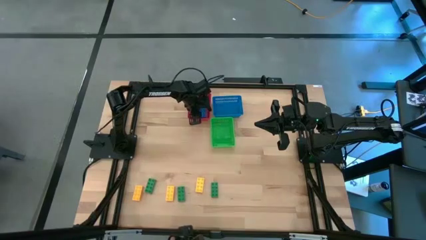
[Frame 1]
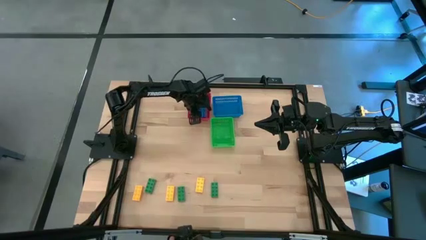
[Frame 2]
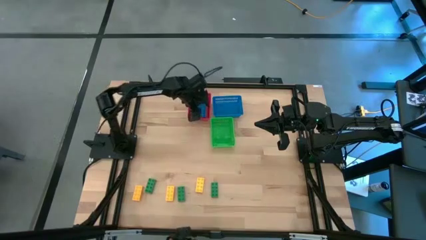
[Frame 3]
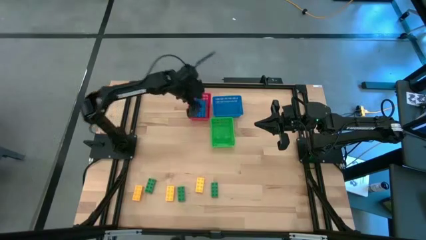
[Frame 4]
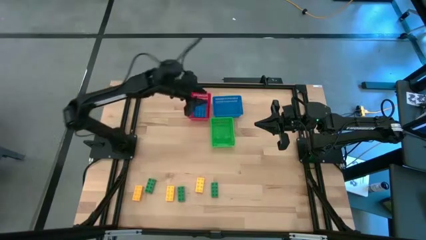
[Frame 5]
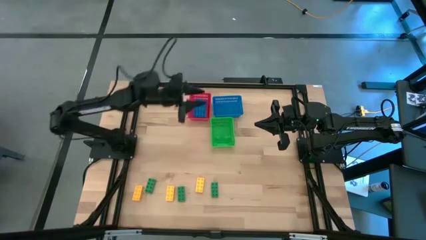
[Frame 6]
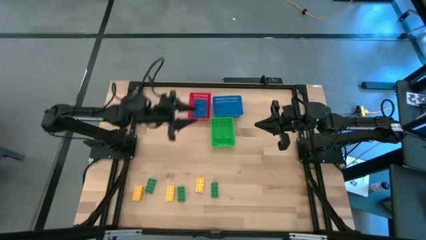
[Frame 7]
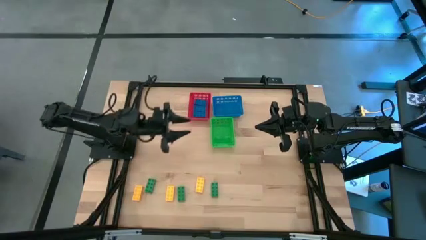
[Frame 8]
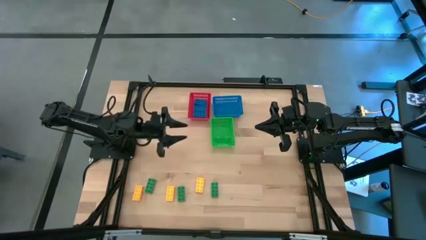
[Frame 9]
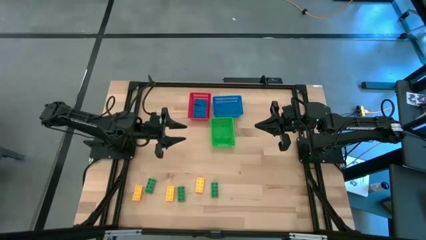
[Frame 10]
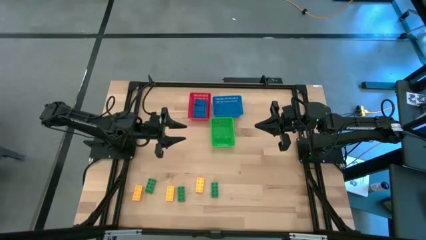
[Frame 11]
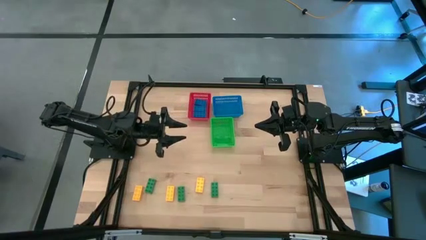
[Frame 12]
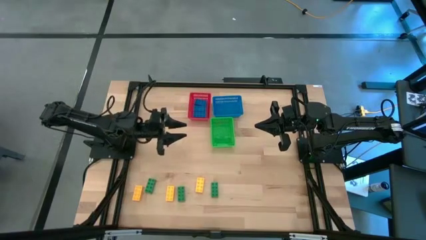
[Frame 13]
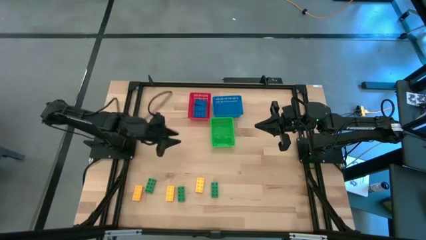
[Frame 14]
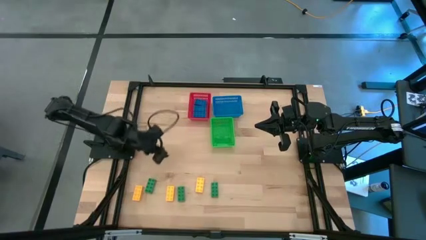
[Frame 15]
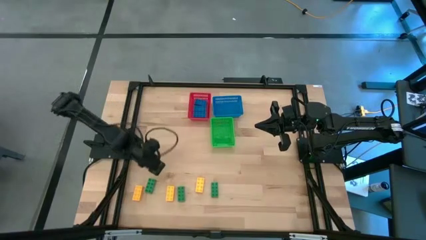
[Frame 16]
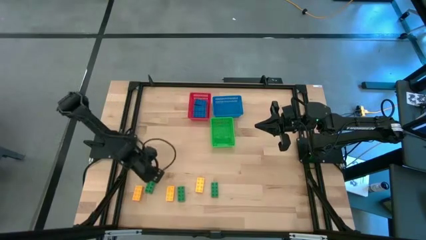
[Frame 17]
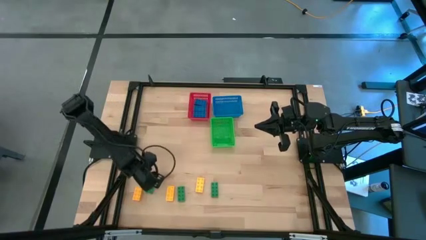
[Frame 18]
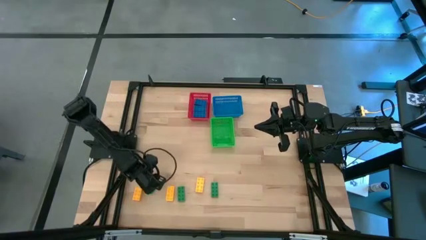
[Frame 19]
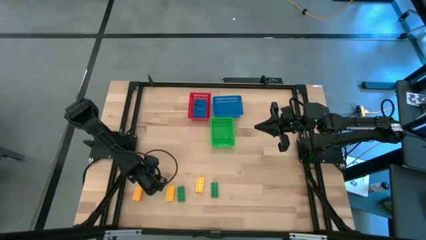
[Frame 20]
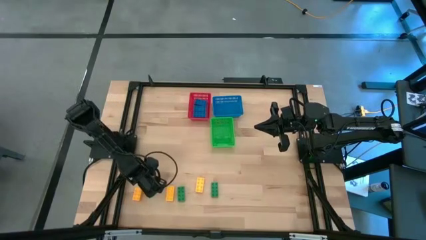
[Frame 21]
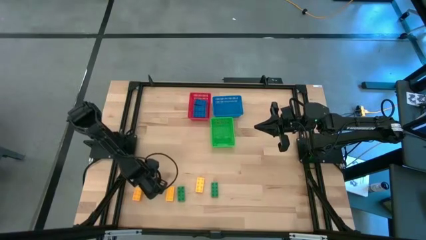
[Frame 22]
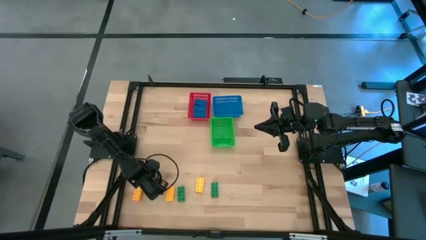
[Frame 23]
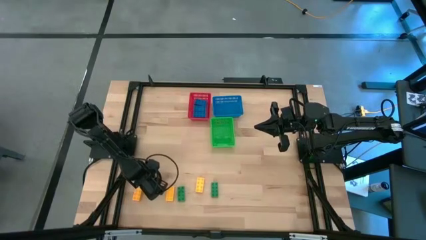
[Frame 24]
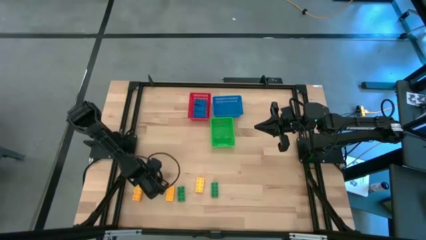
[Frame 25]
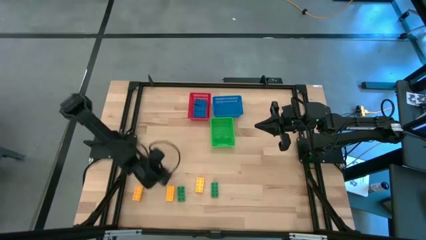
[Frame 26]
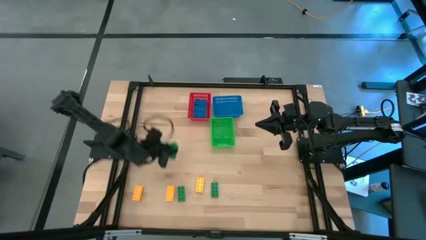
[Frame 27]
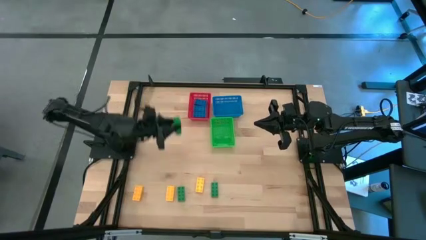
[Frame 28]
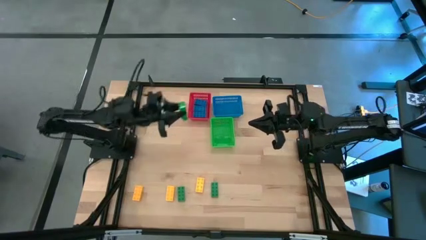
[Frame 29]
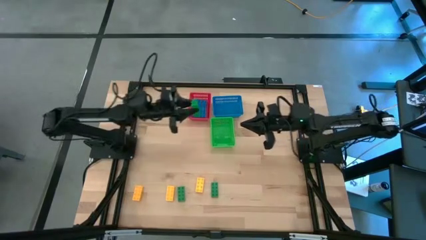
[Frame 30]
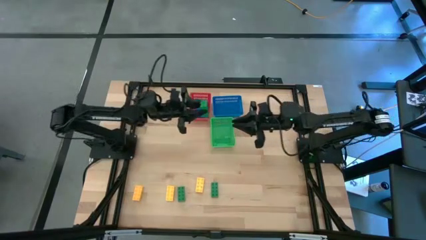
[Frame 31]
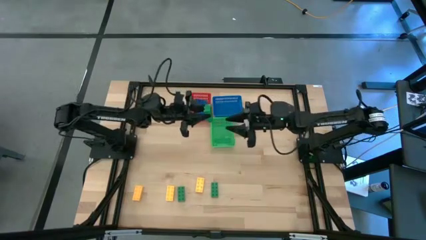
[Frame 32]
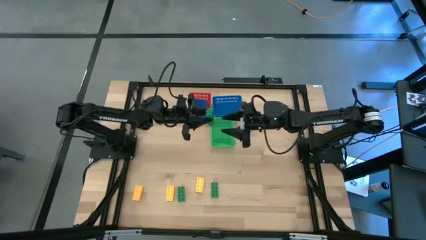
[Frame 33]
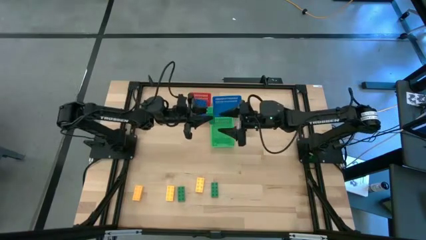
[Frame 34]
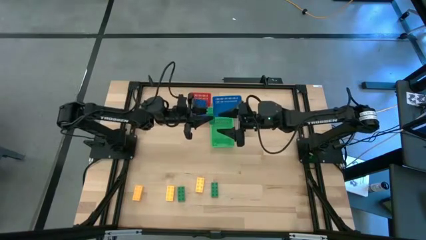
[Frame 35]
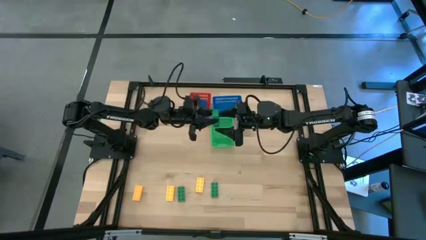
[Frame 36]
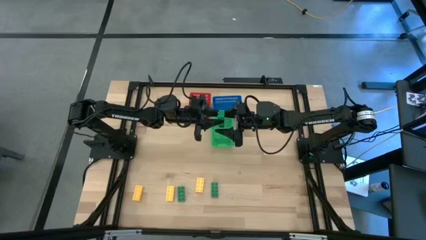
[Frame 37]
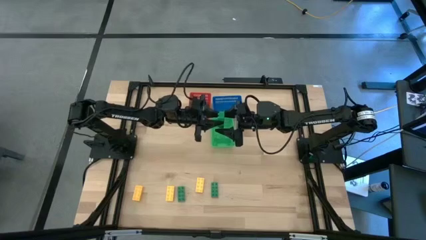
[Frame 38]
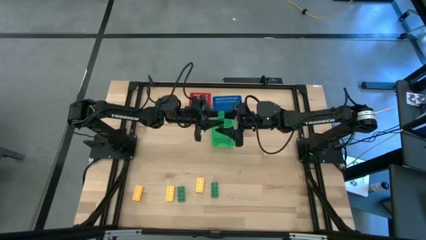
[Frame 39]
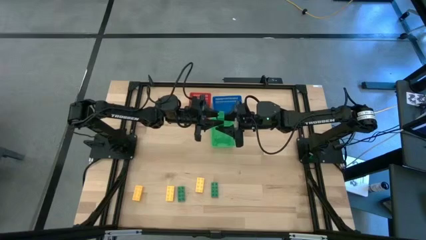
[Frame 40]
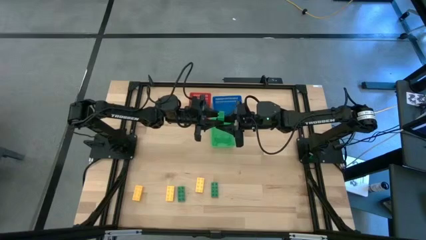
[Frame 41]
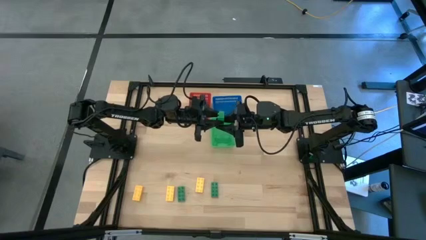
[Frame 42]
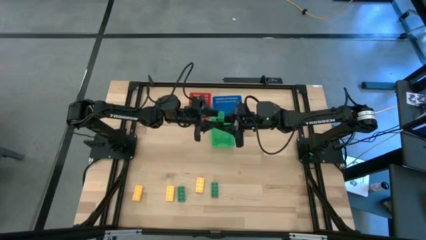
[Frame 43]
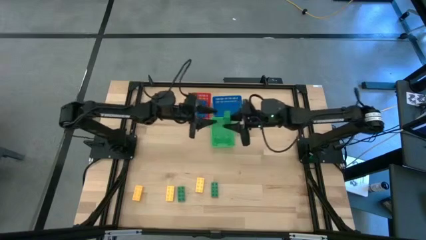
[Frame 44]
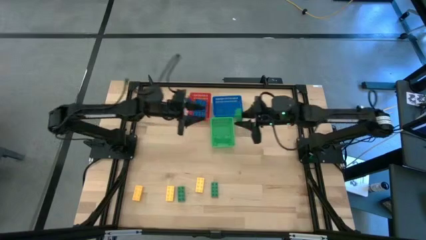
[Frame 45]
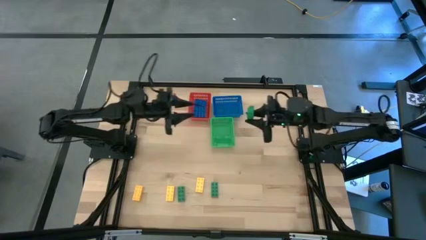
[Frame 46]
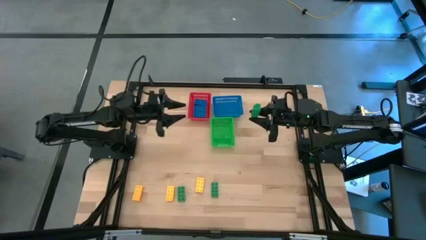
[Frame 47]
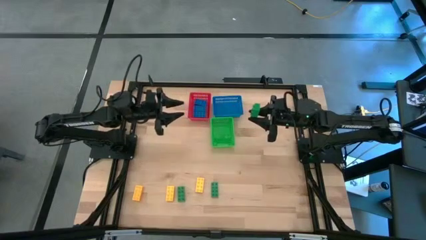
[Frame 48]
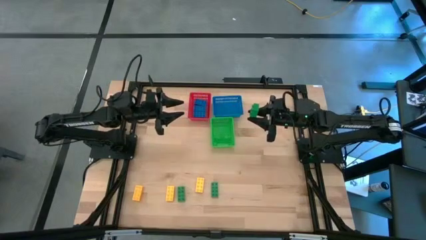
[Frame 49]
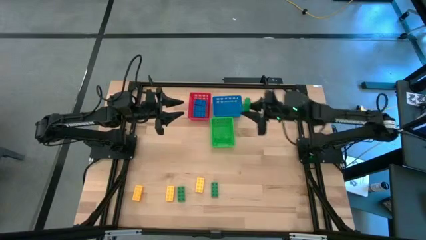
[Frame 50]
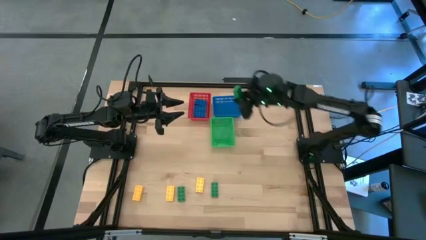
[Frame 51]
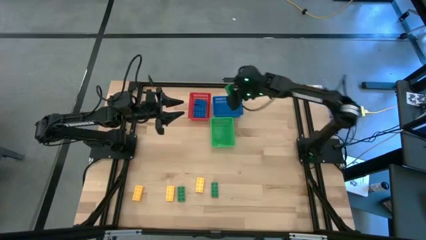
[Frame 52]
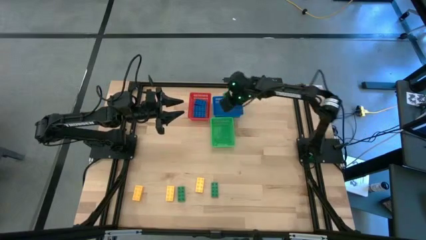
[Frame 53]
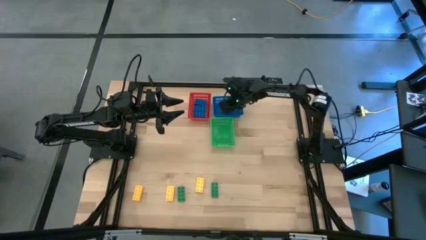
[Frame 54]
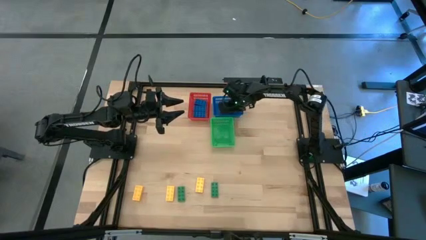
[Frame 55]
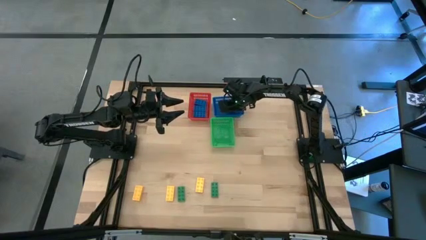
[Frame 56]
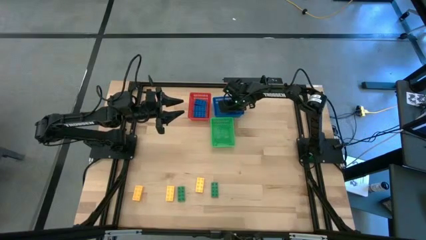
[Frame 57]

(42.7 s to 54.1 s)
Task: Sort & place blocks by color
Put the left green game piece into the blue bin

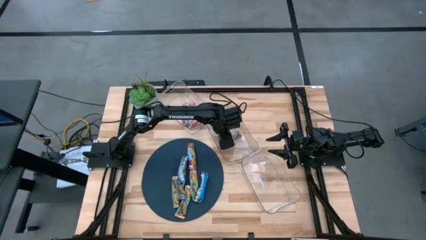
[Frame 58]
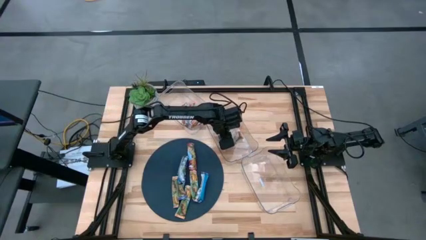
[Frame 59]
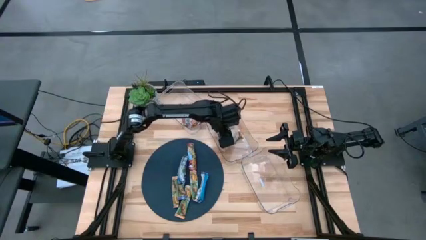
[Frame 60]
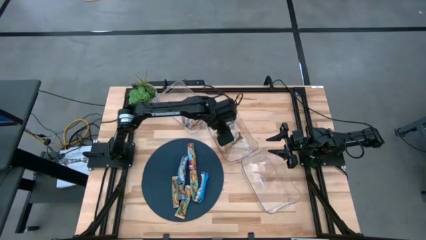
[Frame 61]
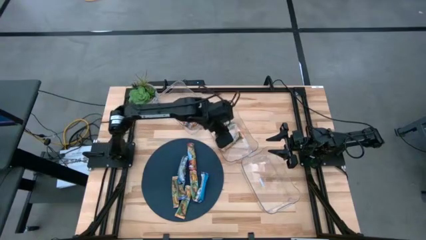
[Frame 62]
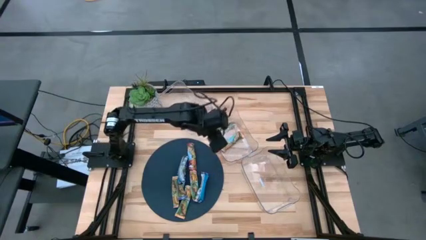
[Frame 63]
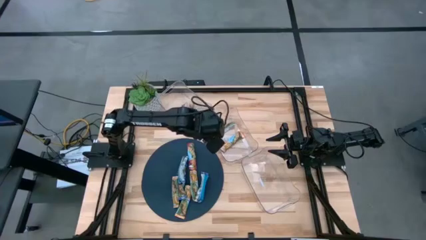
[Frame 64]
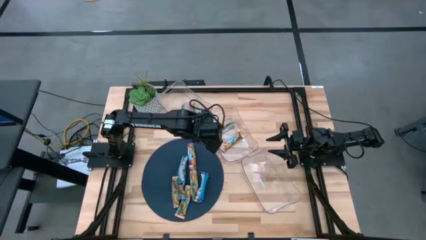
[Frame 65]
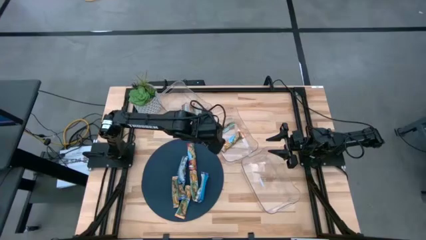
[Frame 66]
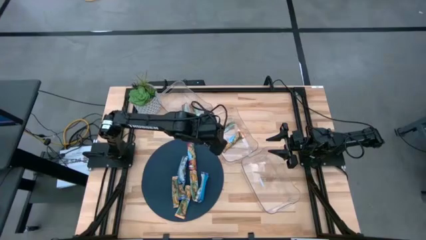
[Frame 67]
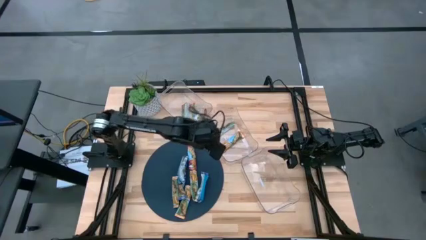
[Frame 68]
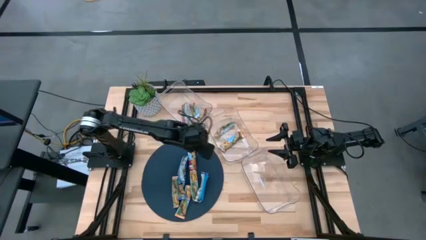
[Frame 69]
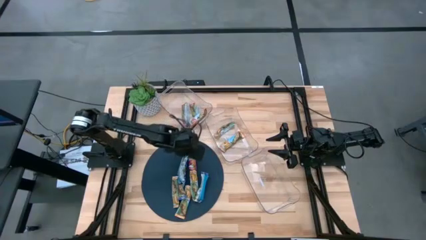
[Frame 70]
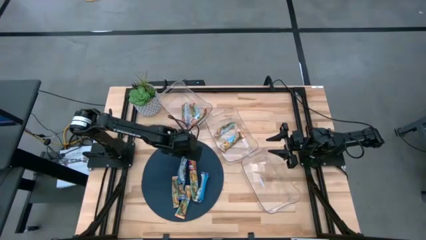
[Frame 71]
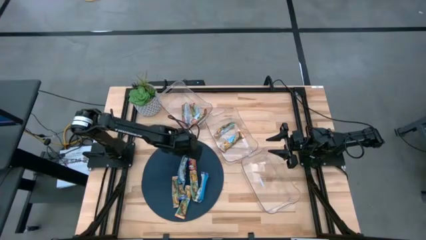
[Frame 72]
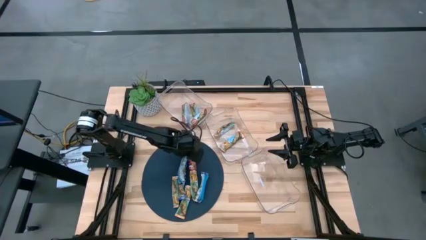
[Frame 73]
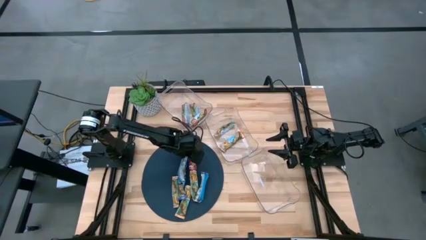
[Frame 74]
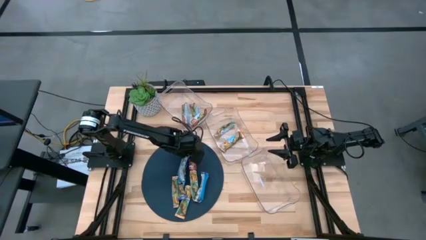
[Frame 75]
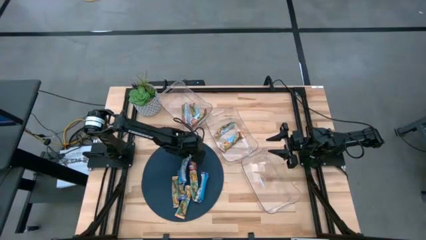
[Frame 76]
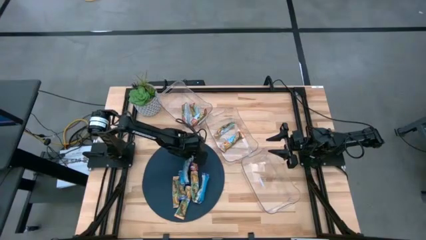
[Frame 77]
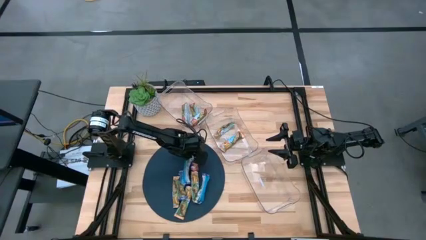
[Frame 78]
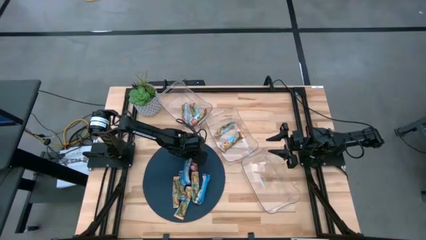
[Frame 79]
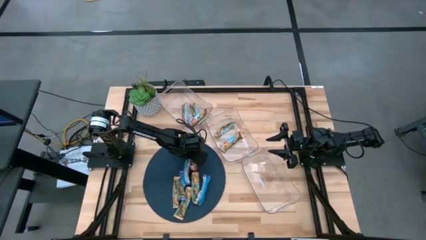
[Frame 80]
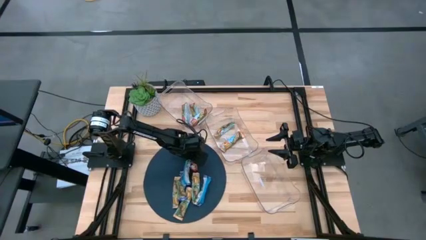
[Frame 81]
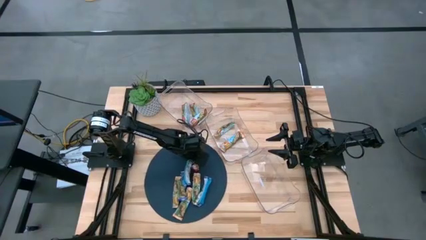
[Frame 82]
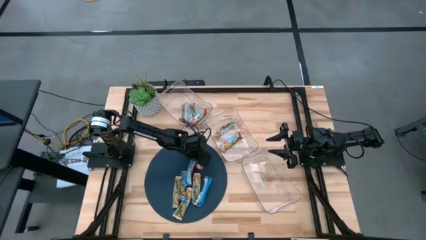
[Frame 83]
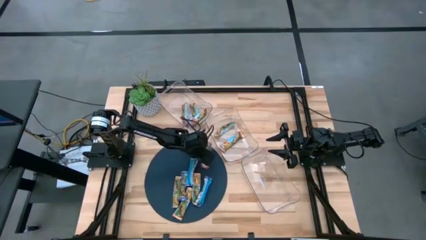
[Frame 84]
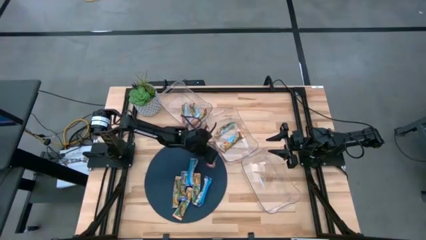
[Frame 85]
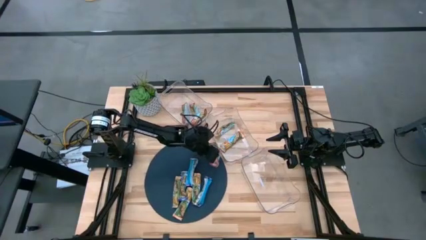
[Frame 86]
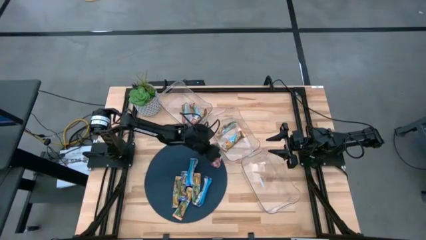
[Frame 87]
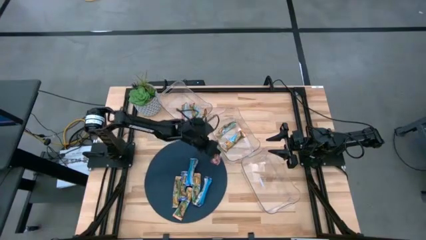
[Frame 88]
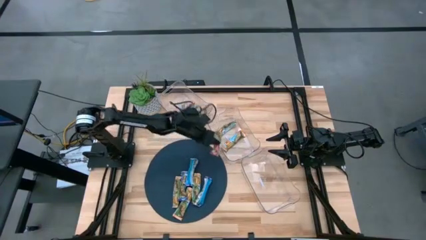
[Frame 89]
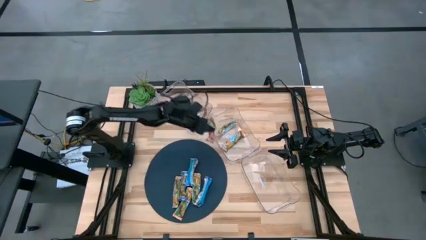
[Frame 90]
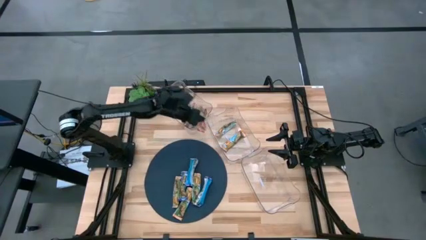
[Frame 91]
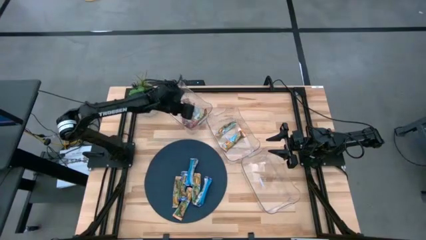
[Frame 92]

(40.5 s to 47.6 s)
Task: Pick and place Granola Bars by type
Put the red granola bar into the top transparent bin
